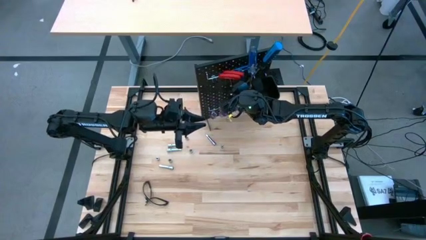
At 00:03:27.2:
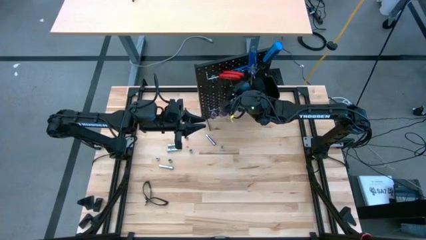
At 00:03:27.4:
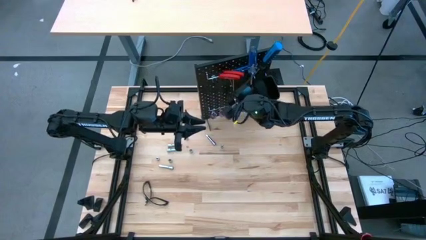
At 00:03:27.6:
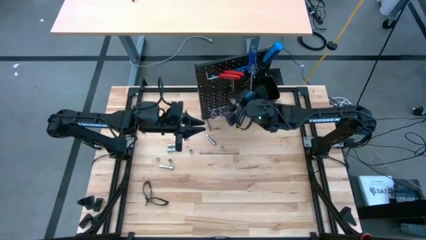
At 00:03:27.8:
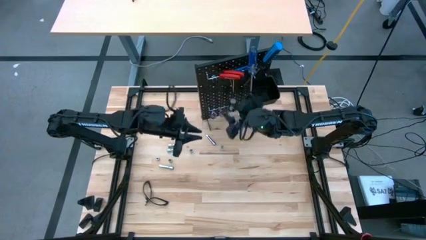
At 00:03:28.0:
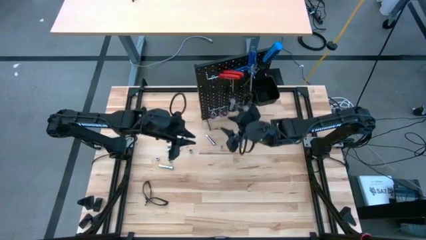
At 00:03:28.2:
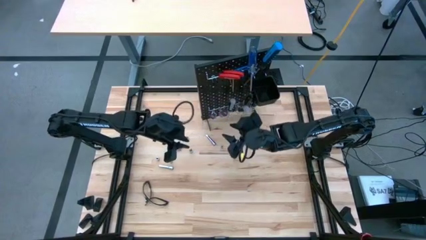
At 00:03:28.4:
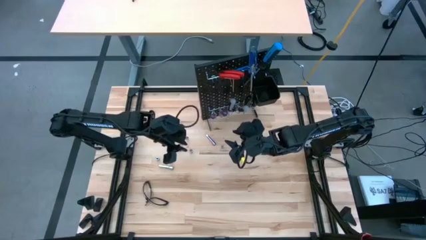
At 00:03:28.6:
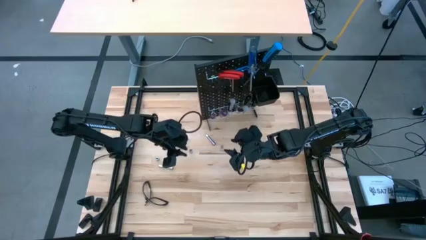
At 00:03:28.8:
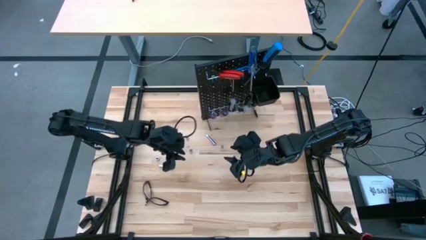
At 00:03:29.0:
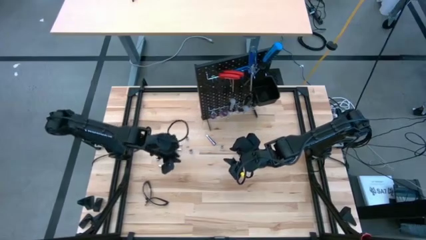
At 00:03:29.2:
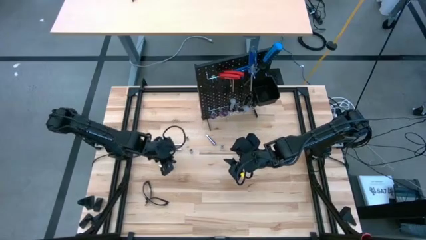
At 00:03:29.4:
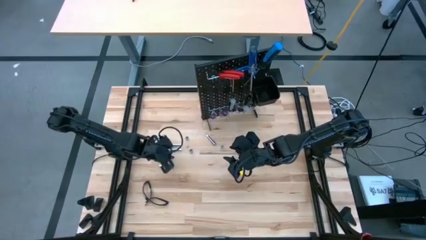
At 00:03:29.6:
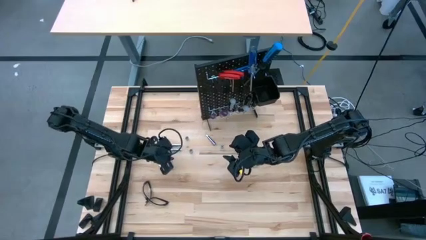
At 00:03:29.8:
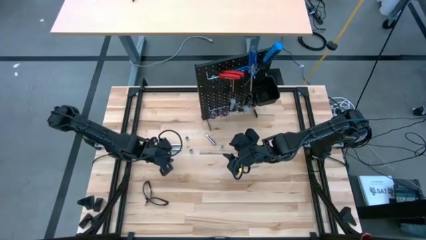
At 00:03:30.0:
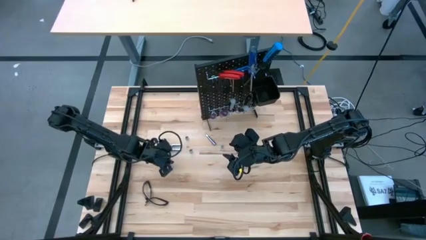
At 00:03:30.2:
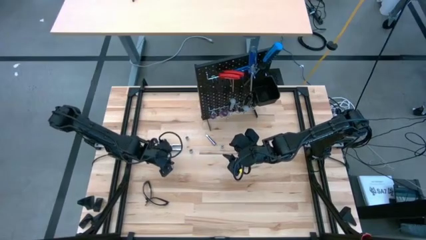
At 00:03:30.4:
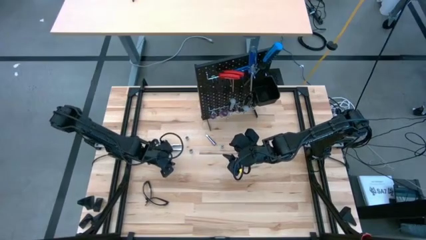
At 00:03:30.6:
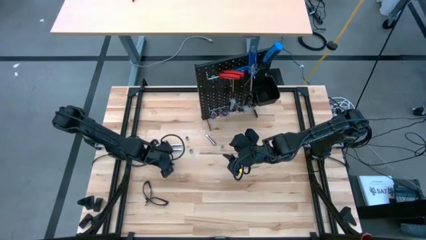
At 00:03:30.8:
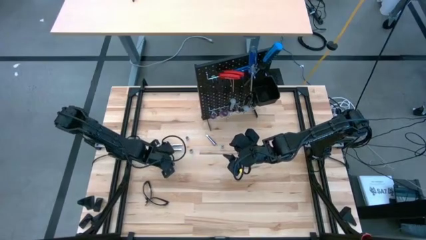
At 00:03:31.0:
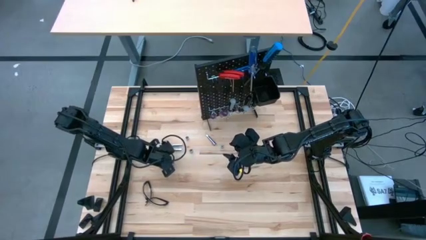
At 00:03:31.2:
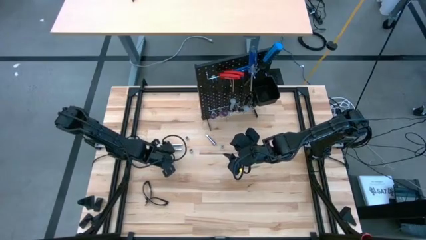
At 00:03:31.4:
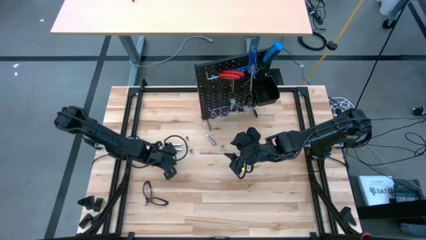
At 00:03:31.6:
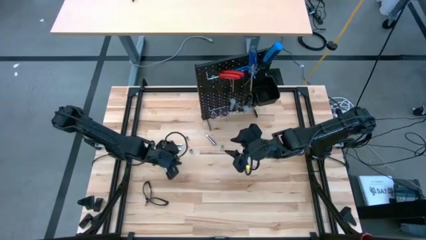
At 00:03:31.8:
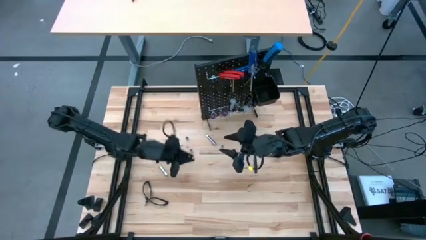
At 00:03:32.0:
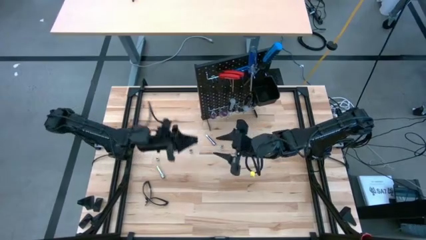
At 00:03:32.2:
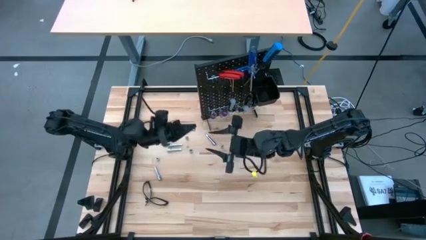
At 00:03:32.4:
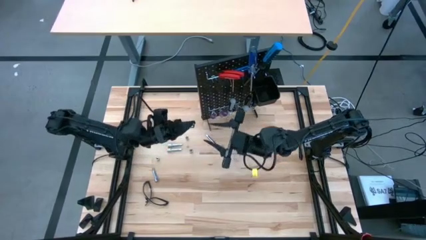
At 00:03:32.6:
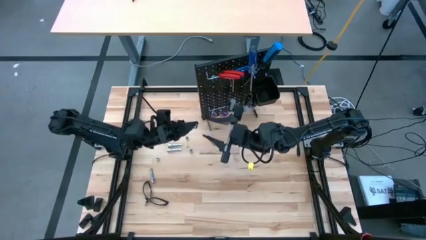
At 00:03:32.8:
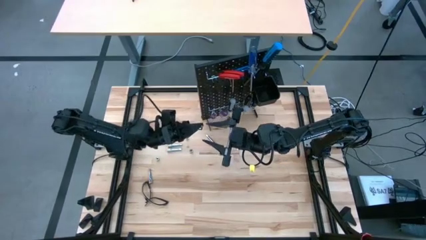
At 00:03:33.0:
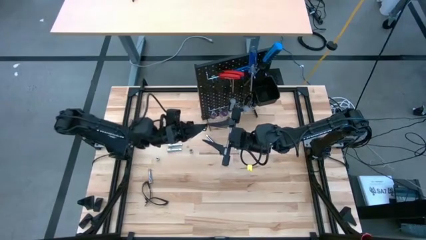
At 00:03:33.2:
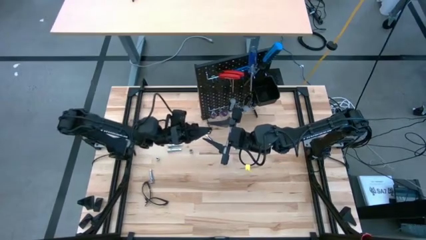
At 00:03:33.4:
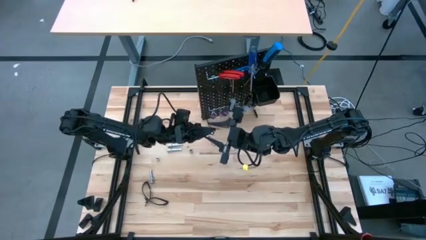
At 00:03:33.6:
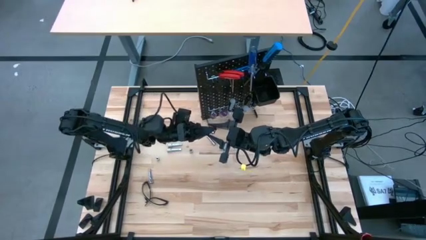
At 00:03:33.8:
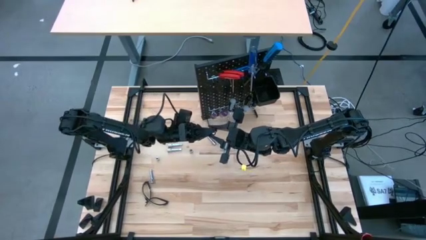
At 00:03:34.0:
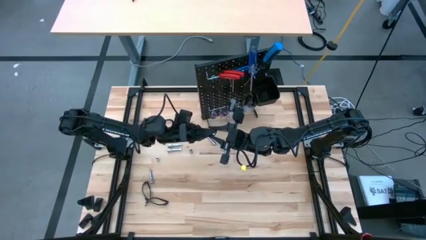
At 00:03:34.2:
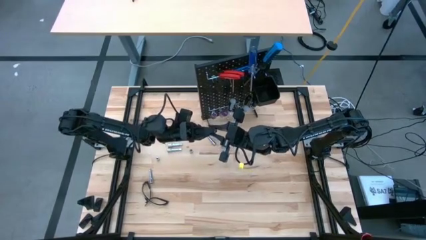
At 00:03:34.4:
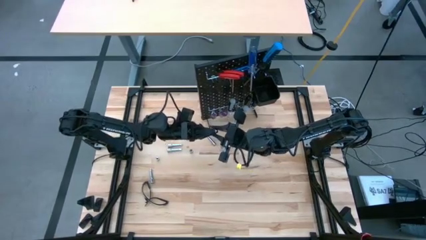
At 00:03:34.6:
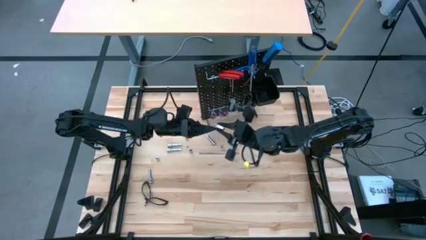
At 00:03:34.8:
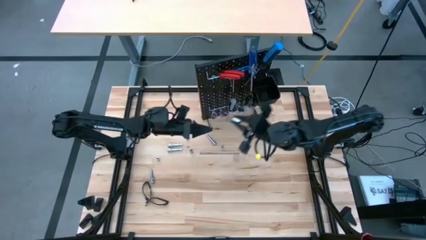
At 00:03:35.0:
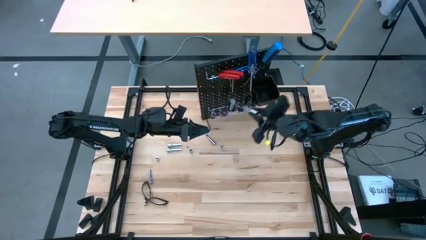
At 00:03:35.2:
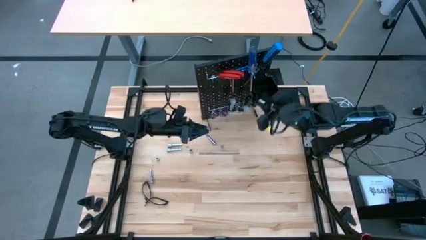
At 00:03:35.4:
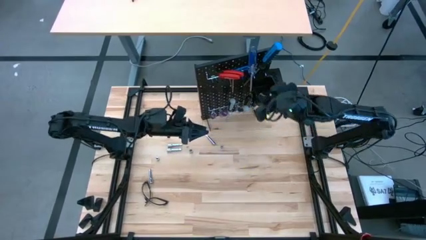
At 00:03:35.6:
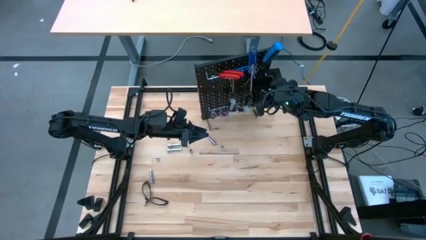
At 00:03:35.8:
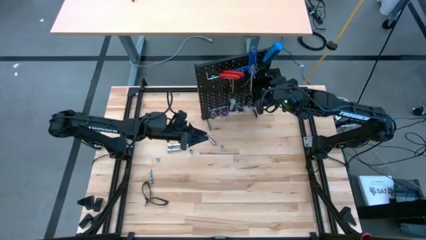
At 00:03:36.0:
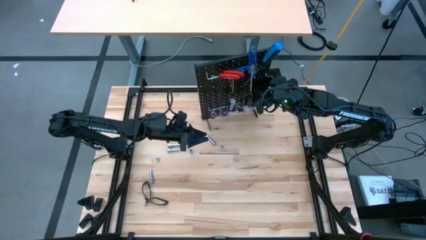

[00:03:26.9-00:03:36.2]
Task: Hang tools onto peg board
Put the silver socket into the black bin on the pegboard

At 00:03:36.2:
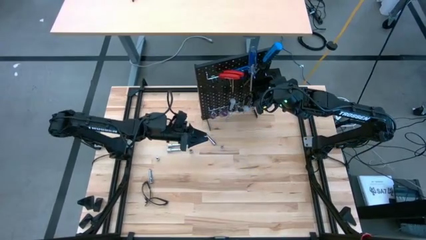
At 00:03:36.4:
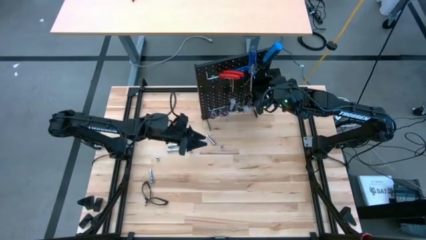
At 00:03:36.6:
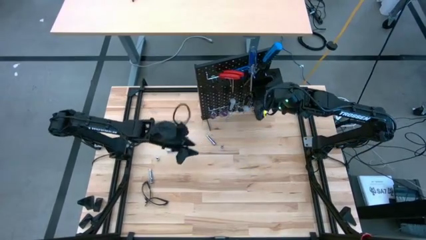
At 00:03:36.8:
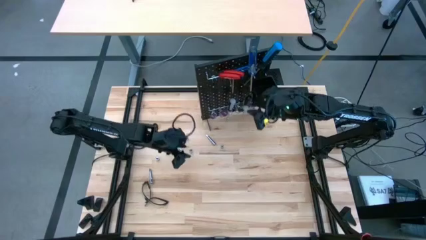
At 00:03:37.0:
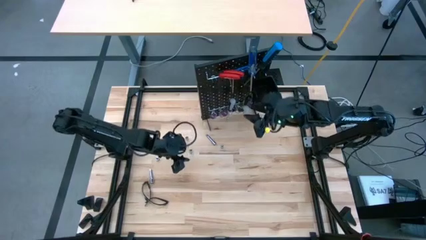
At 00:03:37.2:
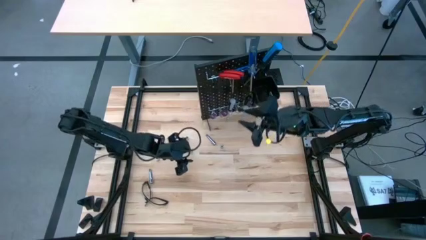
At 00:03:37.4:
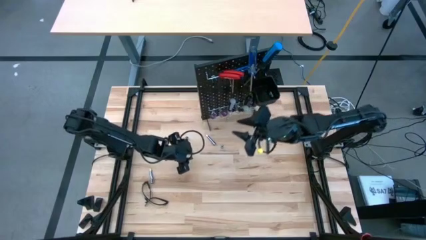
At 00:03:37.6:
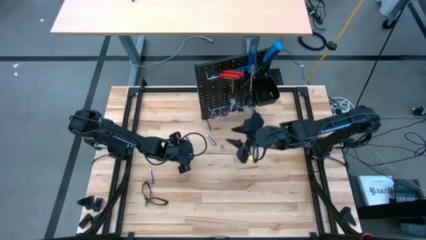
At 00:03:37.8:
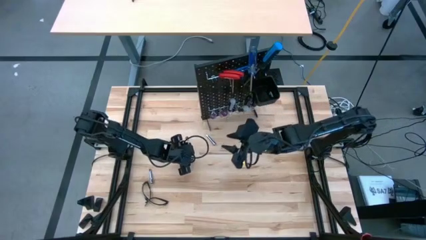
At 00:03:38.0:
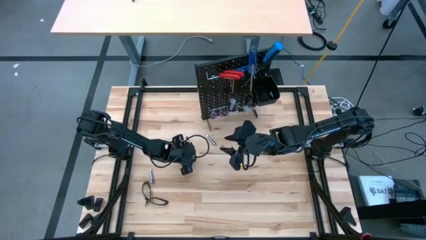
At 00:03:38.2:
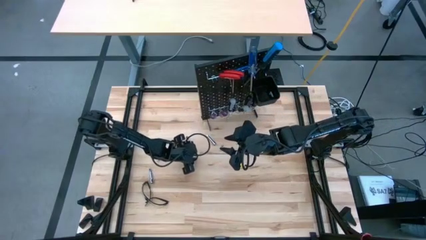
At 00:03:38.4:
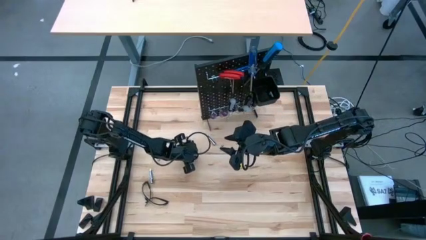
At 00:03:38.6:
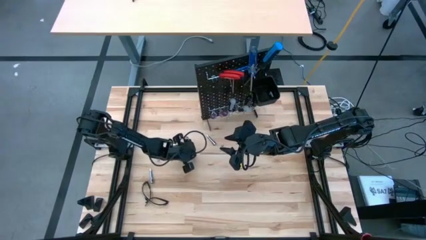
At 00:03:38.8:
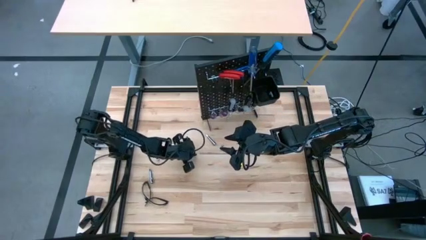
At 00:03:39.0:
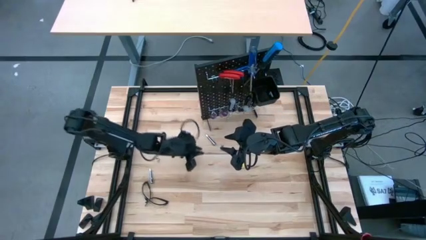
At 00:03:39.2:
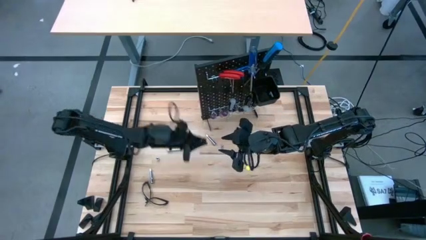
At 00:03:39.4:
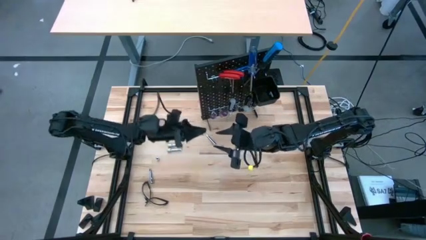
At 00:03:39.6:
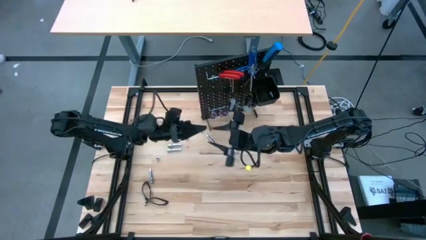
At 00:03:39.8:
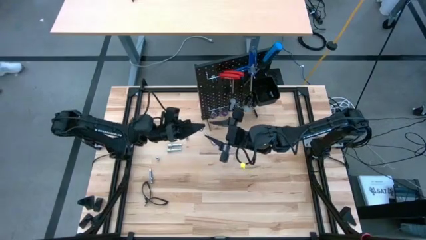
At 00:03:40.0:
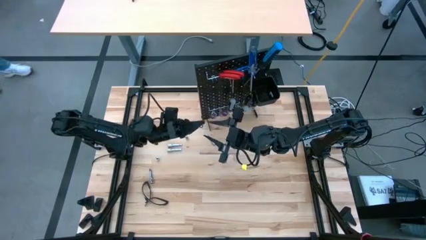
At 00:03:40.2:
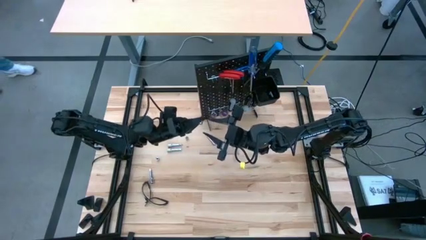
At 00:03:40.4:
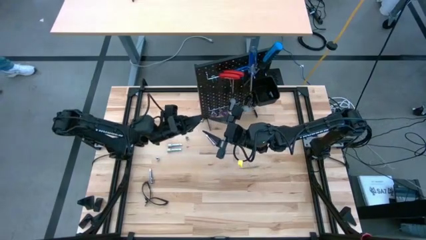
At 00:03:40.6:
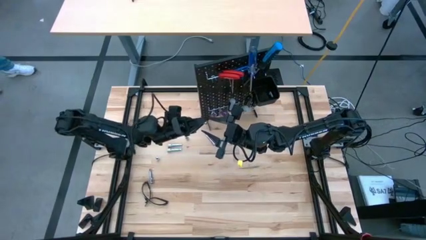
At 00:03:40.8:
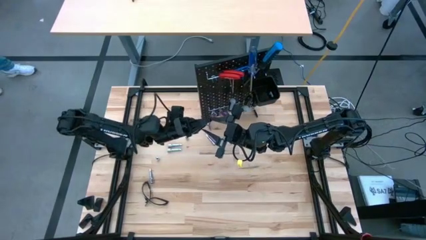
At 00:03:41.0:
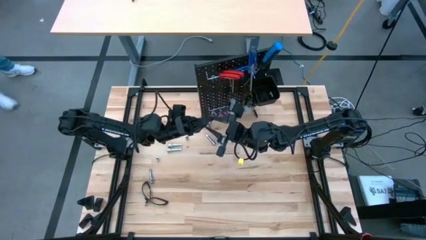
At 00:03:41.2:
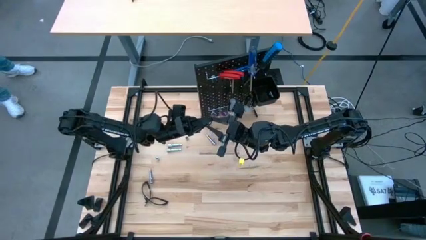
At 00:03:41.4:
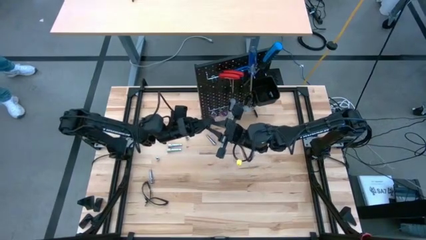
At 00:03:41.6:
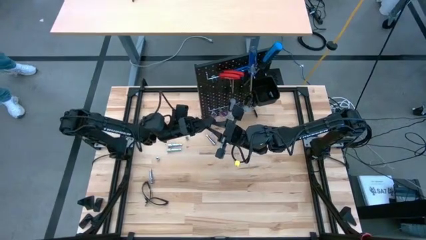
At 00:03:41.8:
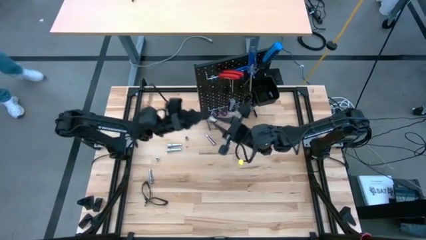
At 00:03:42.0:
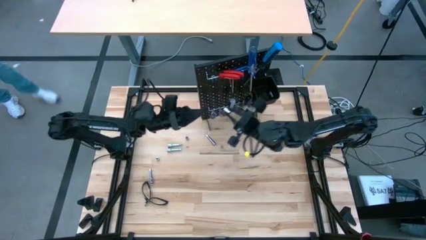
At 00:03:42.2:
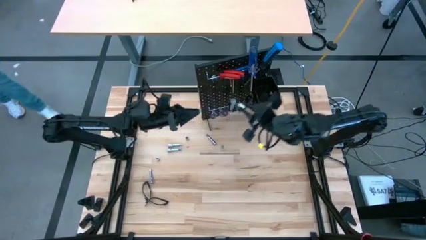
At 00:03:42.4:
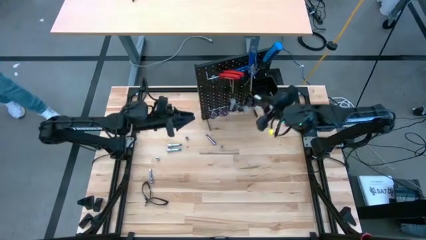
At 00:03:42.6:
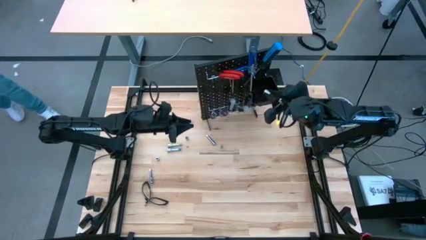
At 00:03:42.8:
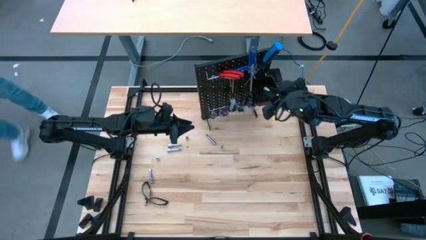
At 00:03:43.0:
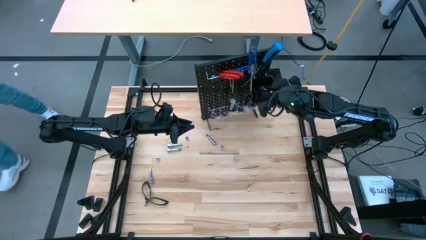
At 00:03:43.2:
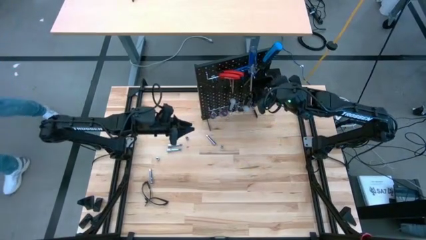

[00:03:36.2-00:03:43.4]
Put the silver socket into the black bin on the pegboard
